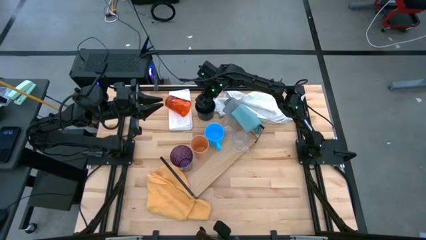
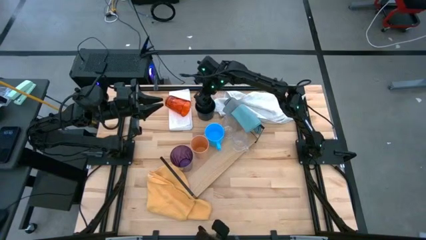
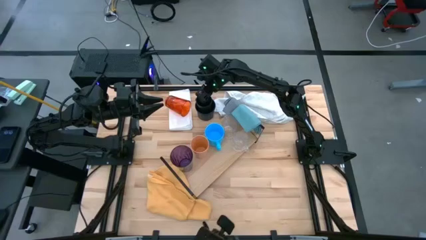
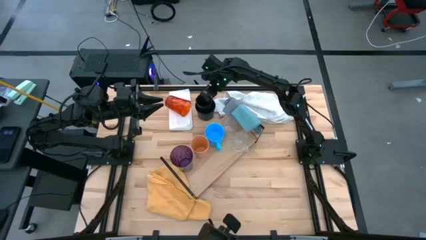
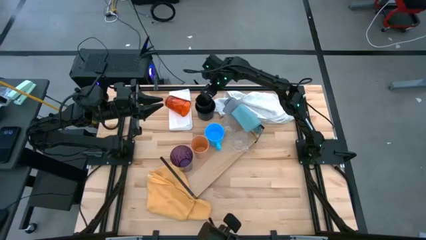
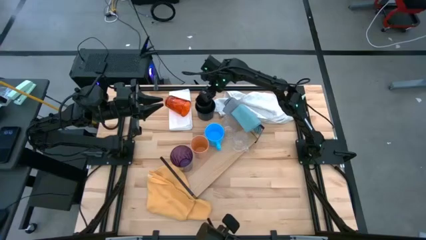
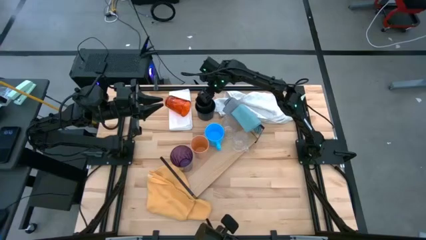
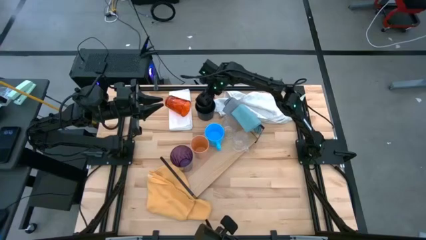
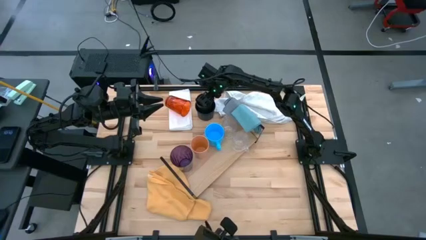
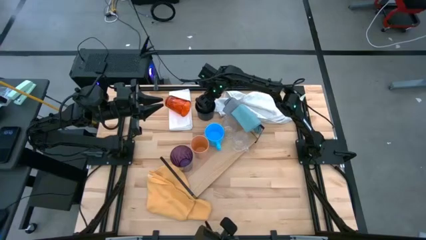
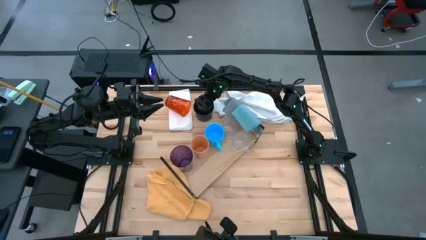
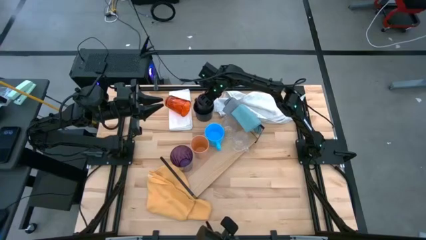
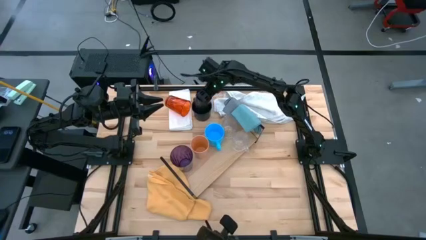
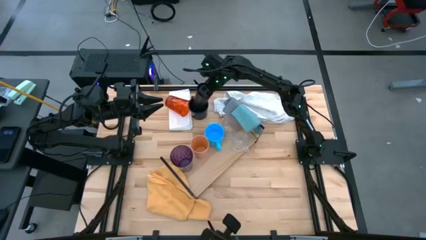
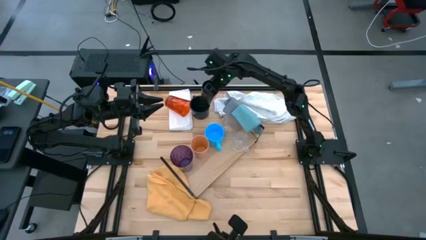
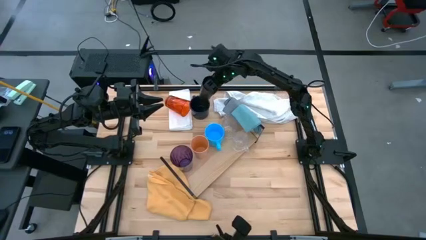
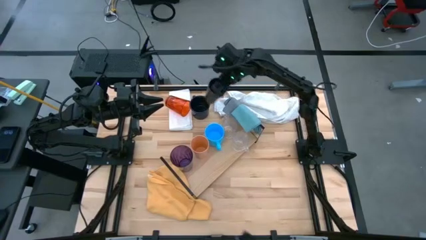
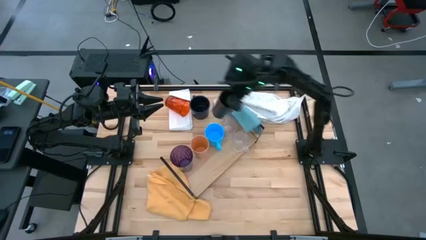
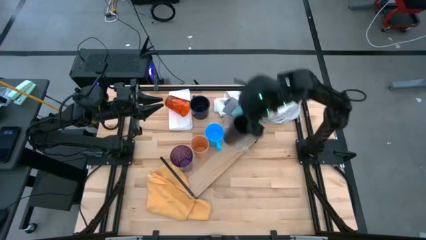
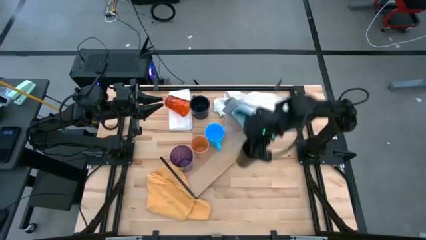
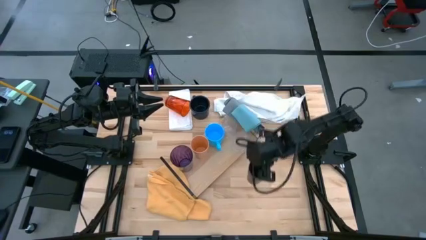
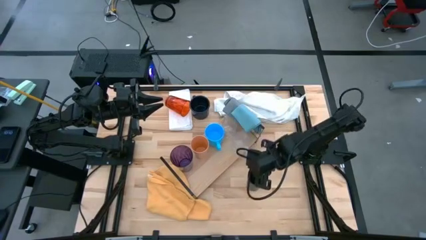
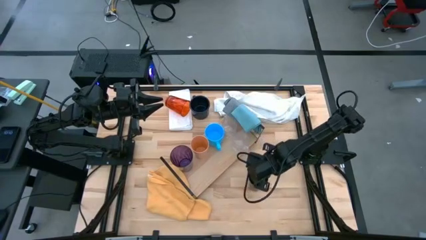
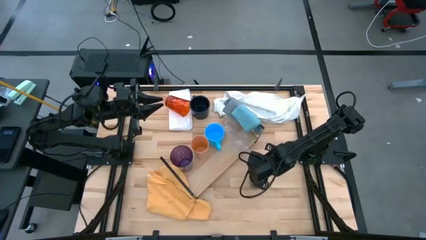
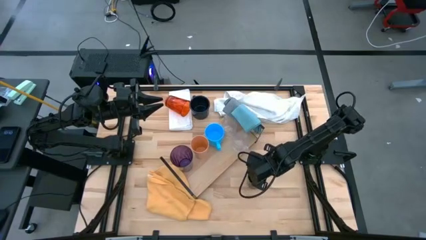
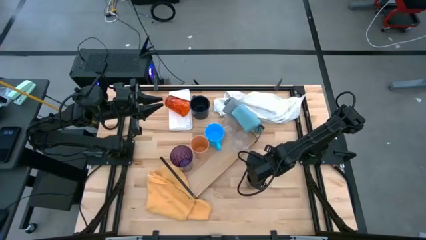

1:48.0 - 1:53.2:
Task: Stack small to large cups/mugs on shelf
Remove the black cup from the dark blue mug

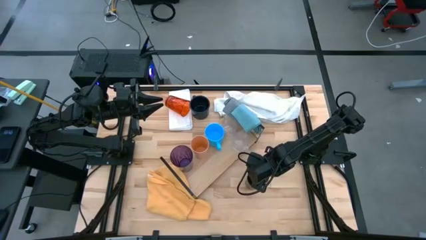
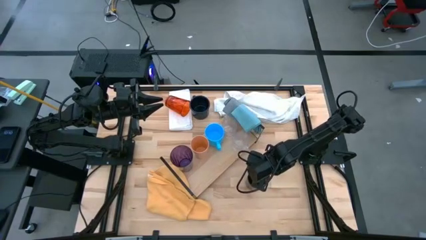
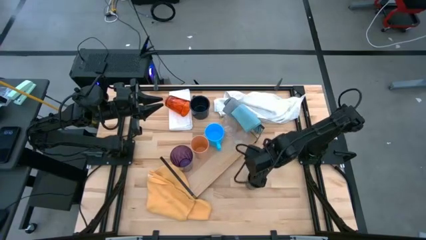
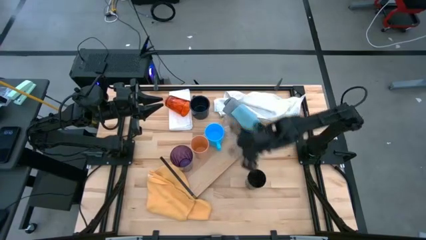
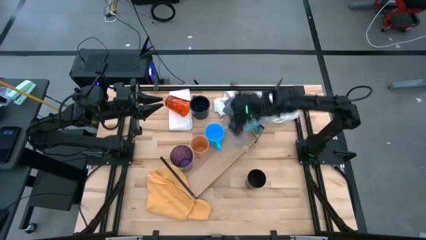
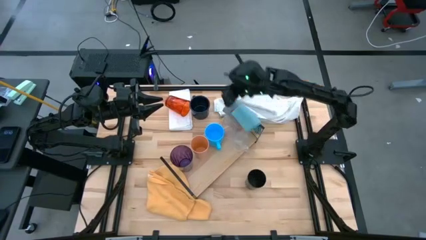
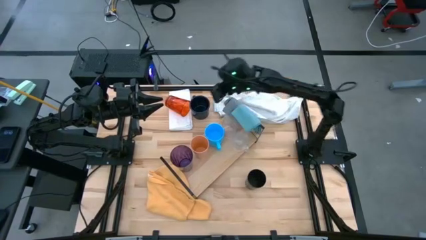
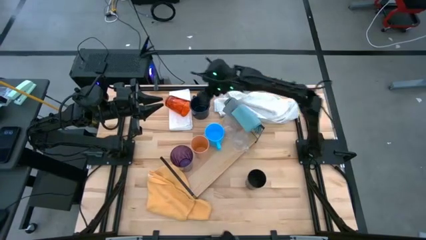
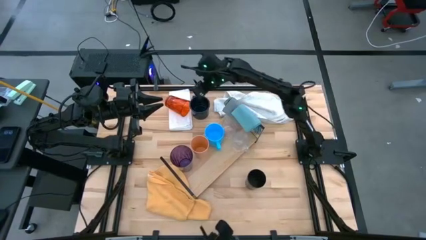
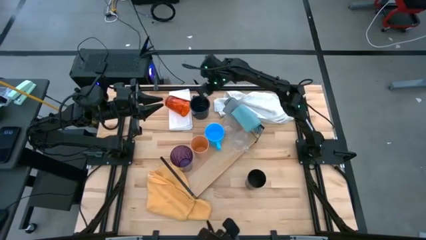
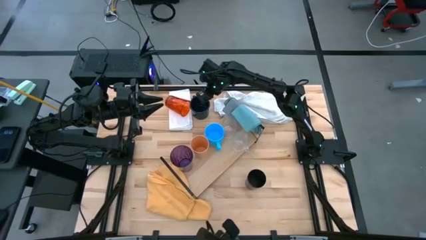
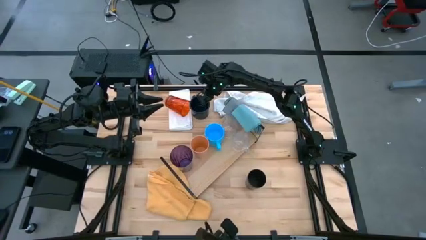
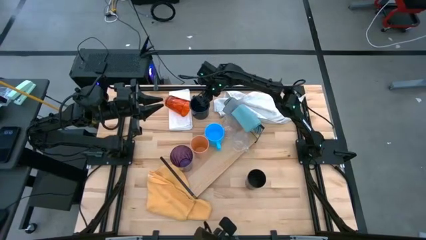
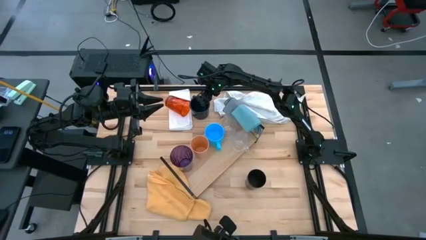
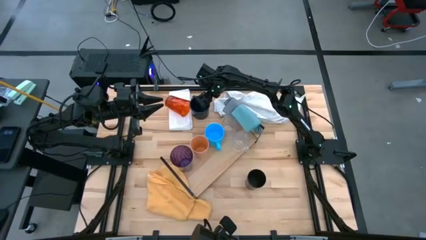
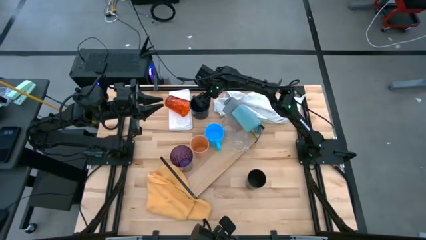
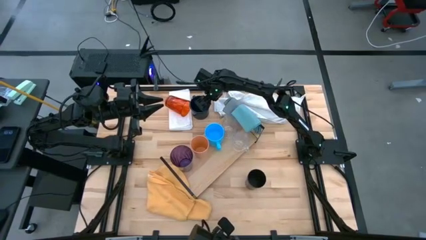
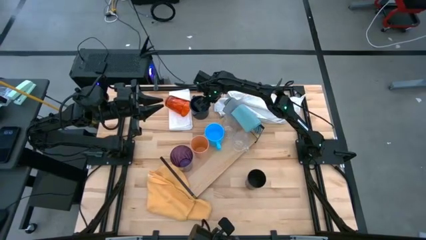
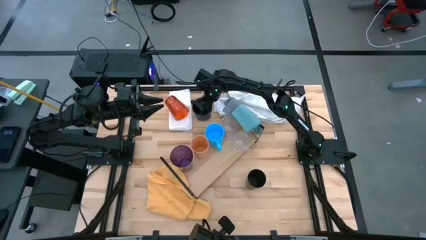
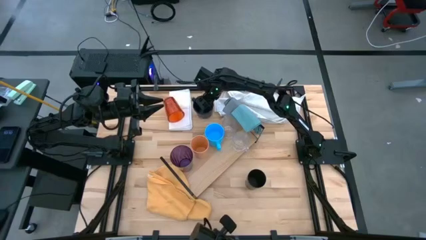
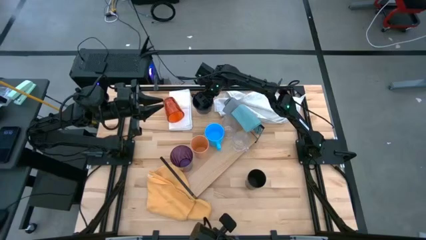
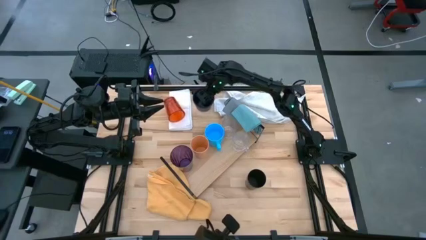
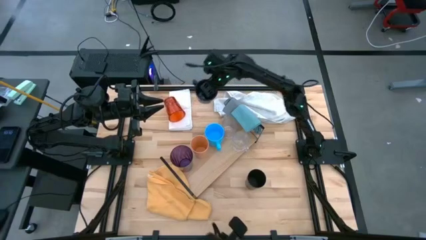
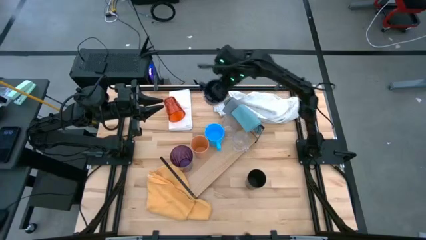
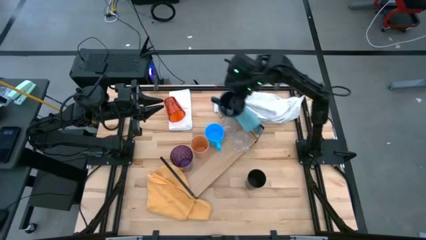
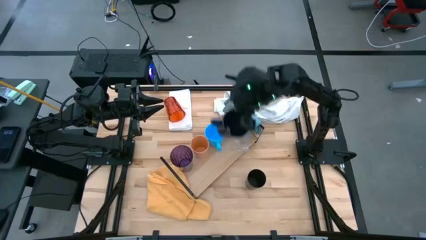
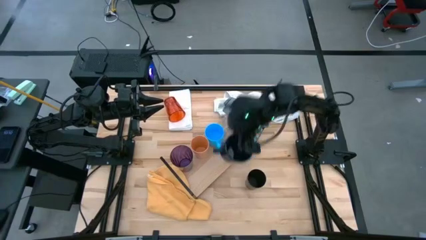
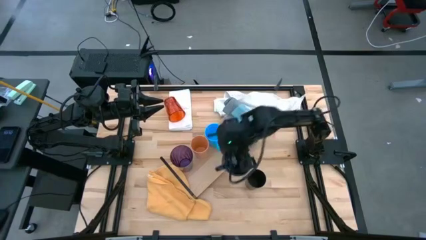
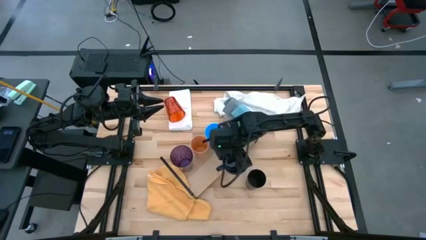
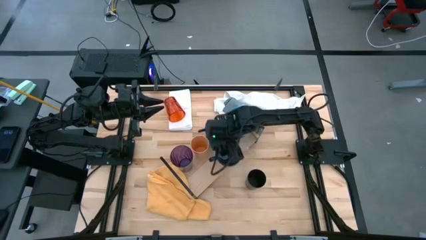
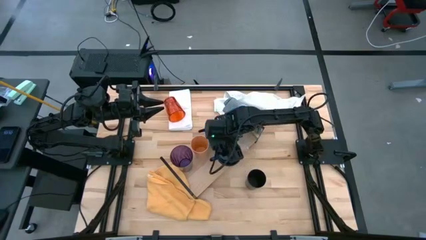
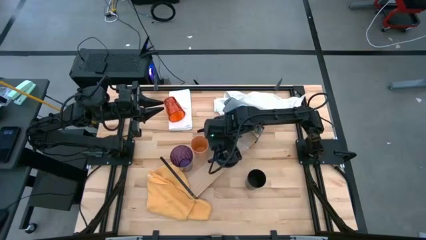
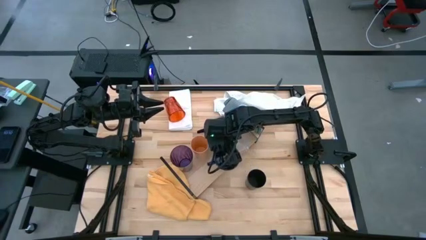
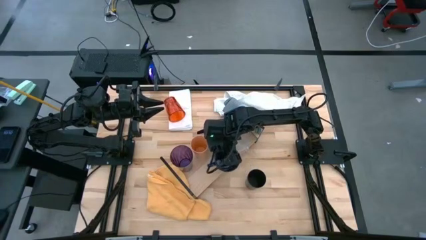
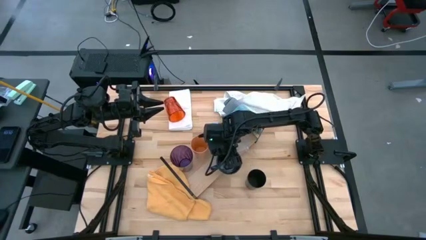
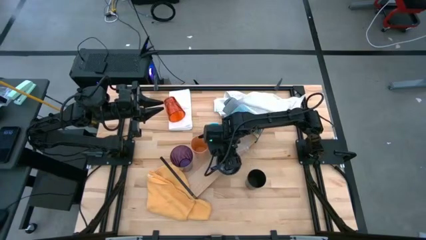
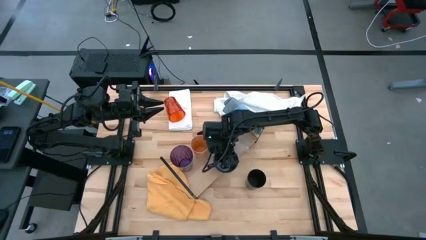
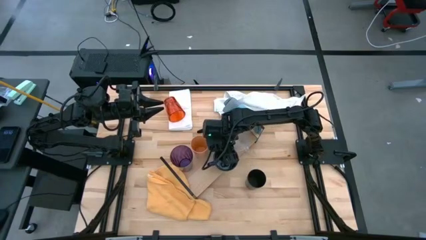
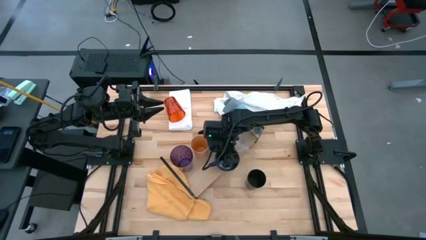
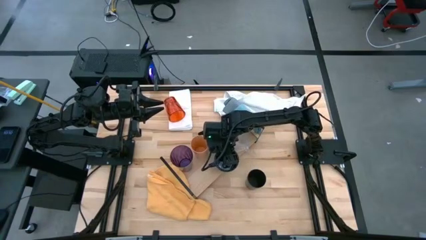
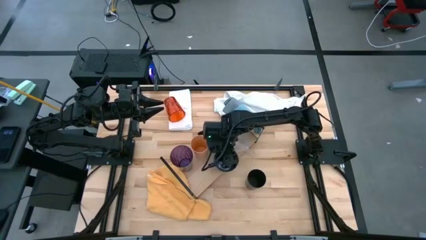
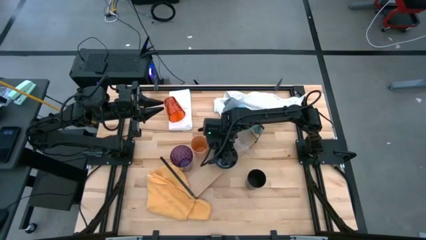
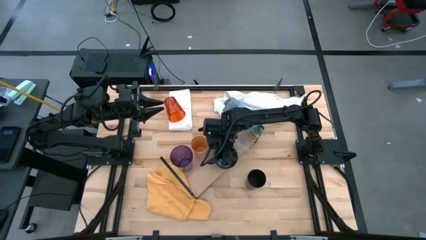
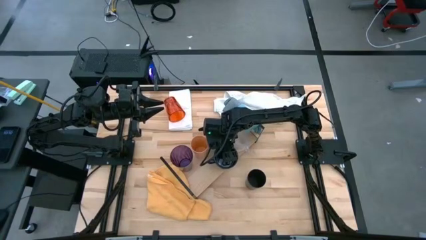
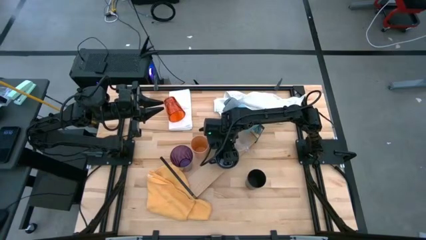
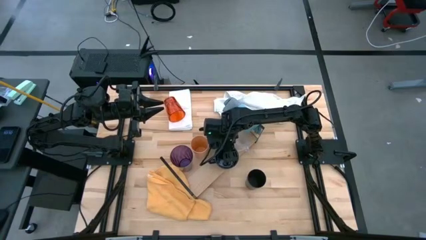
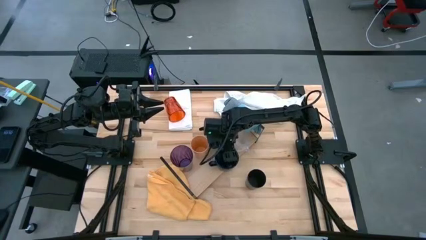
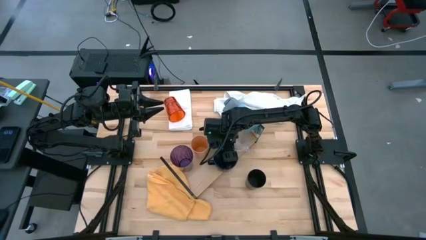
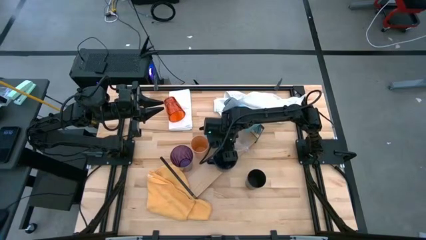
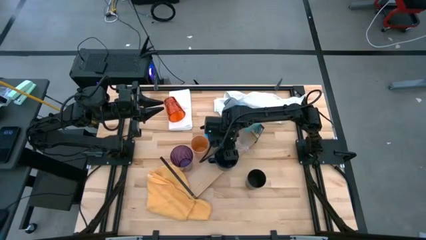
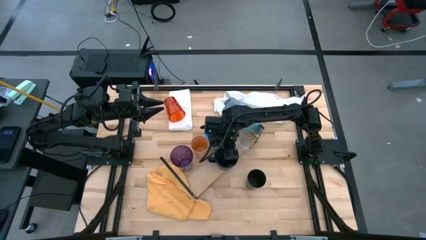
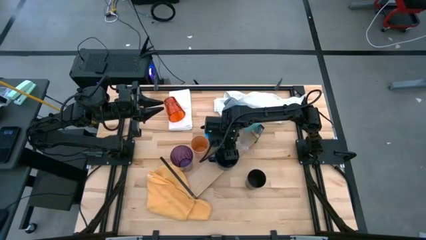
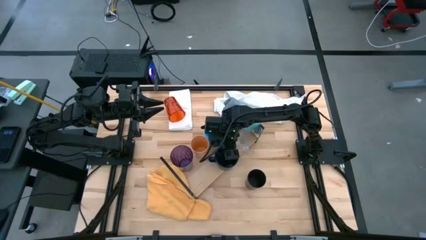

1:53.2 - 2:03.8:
Put the dark blue mug on the shelf
